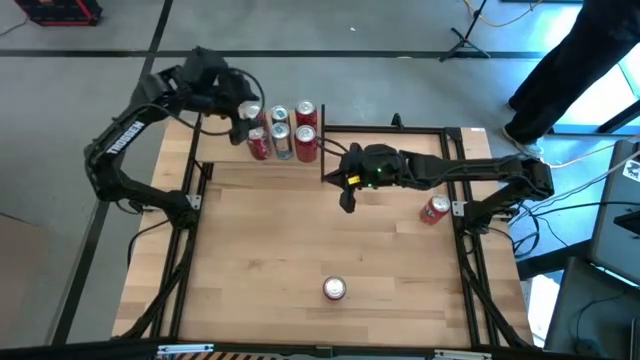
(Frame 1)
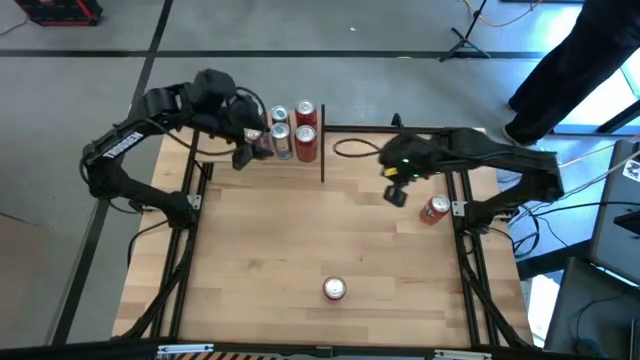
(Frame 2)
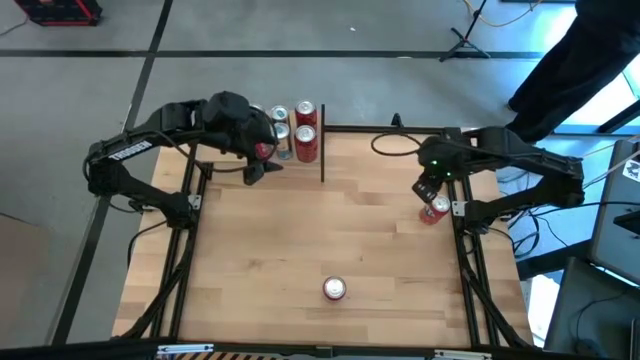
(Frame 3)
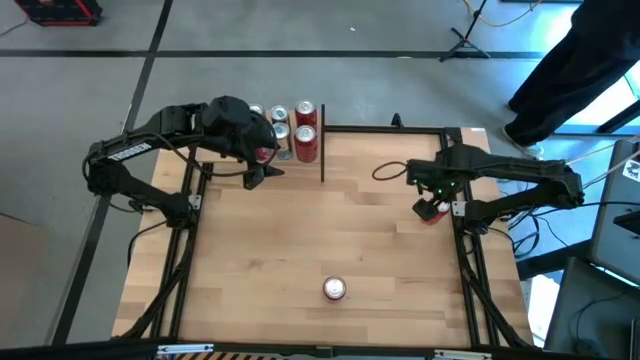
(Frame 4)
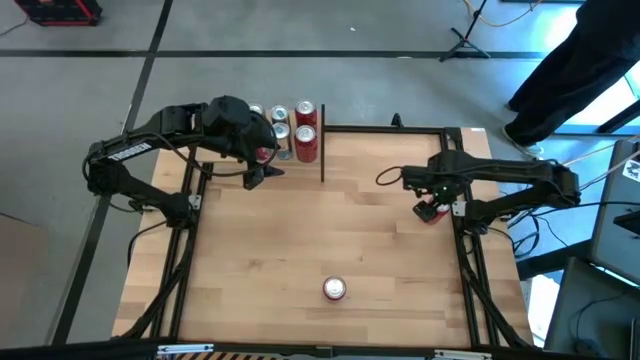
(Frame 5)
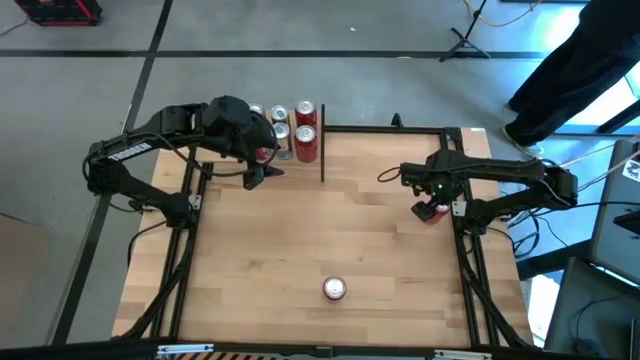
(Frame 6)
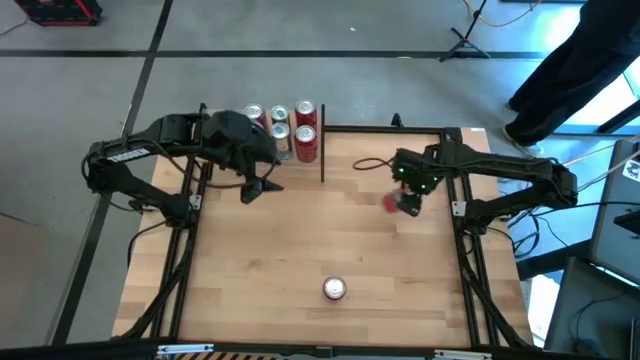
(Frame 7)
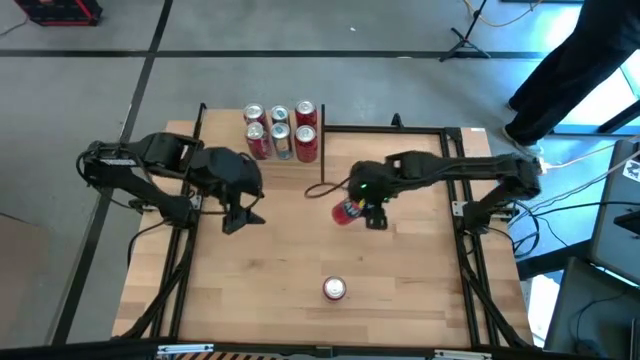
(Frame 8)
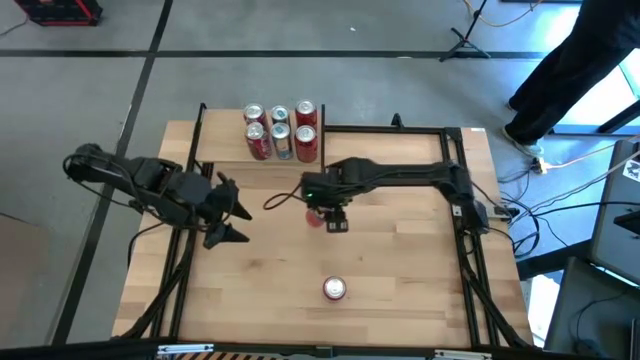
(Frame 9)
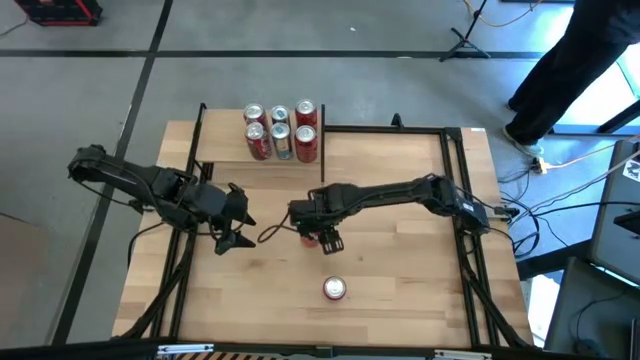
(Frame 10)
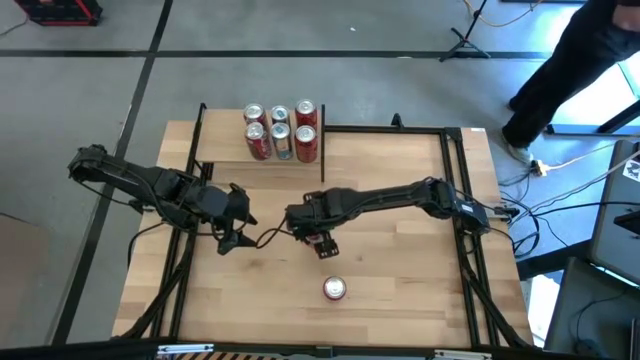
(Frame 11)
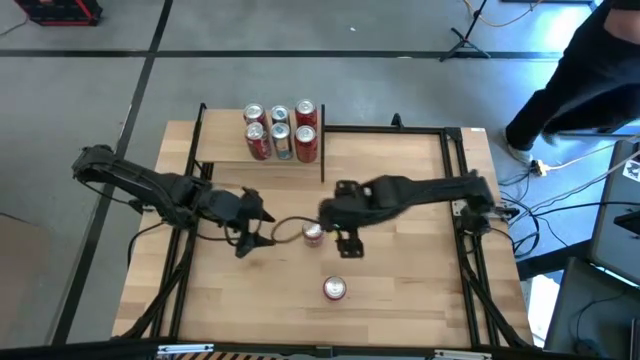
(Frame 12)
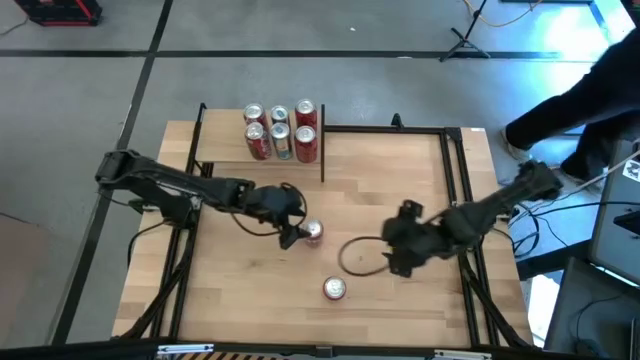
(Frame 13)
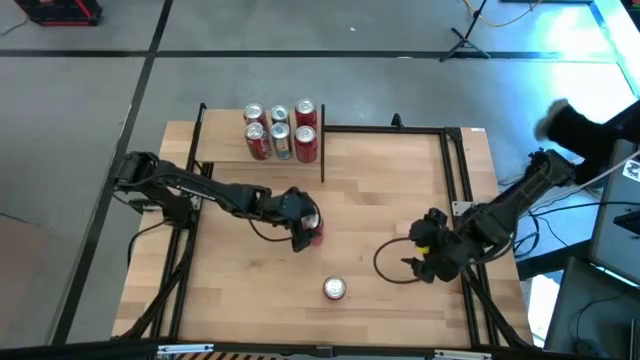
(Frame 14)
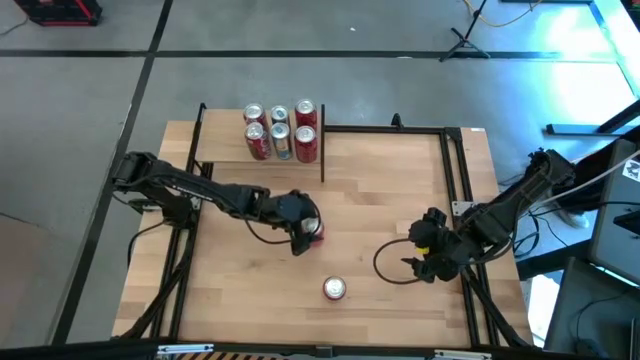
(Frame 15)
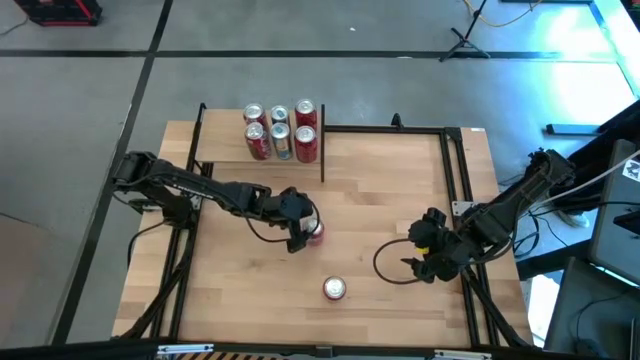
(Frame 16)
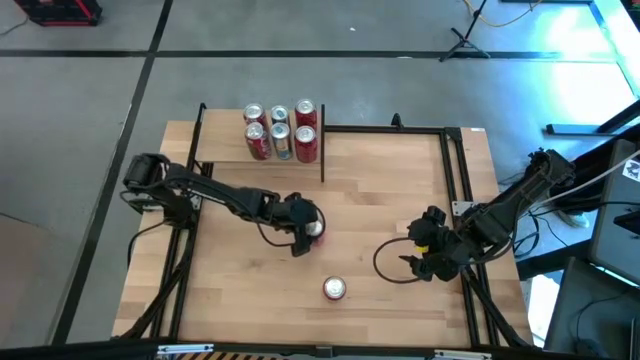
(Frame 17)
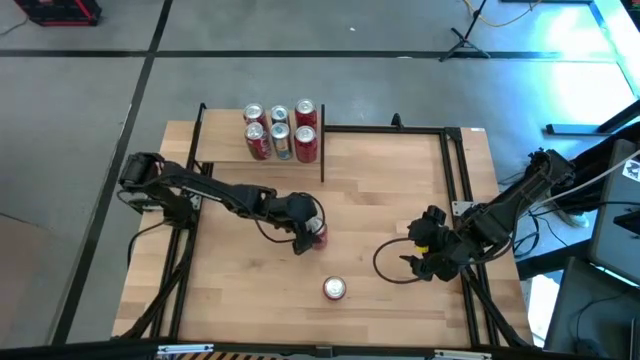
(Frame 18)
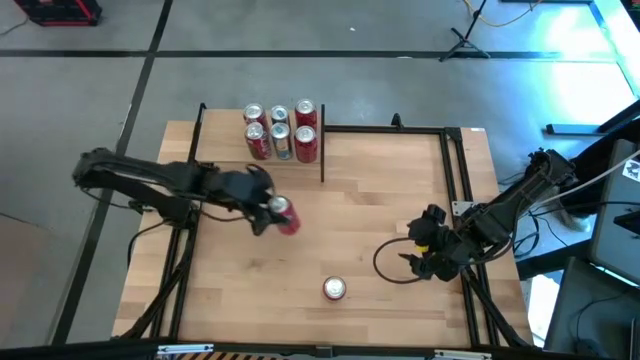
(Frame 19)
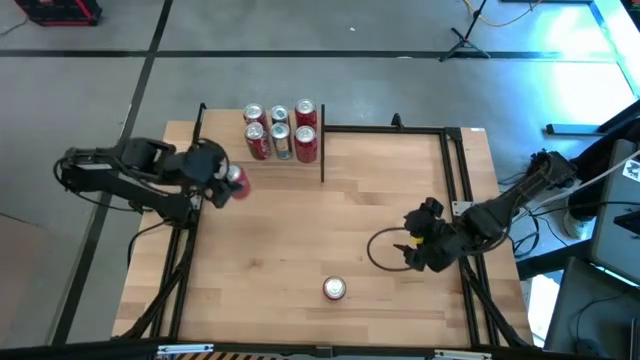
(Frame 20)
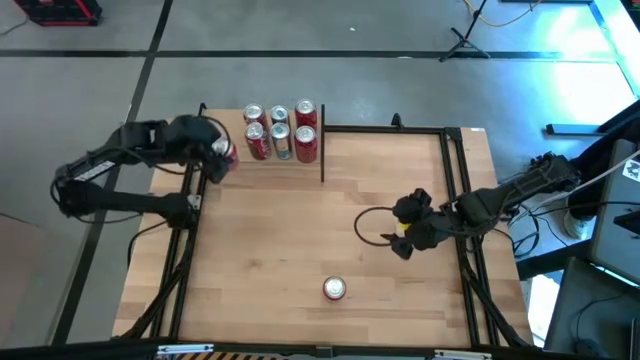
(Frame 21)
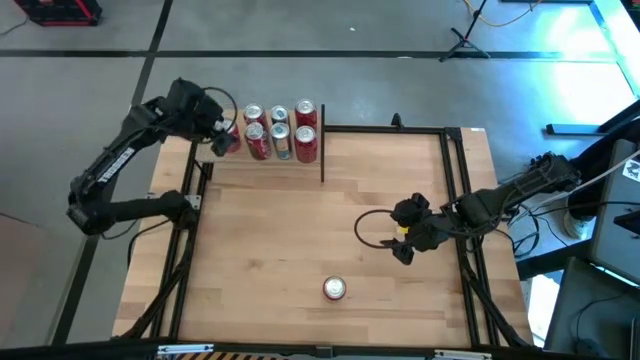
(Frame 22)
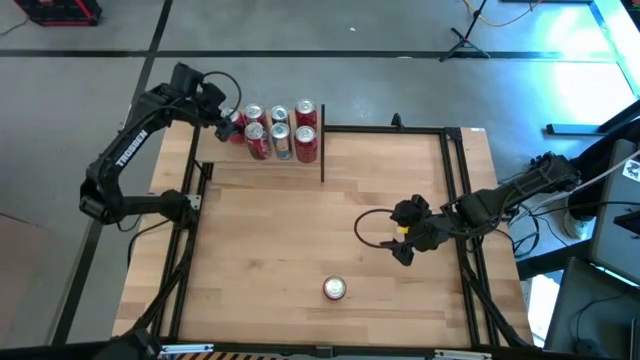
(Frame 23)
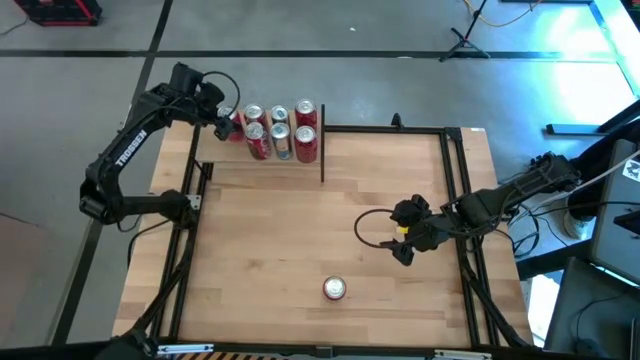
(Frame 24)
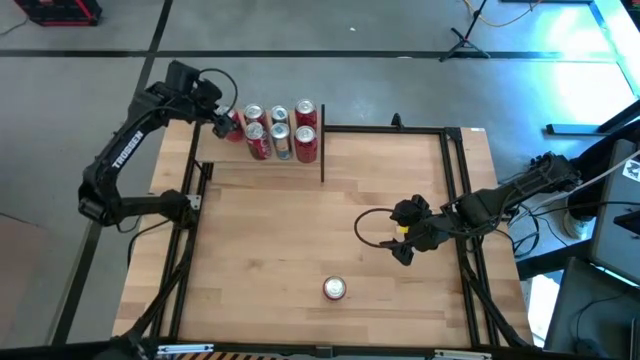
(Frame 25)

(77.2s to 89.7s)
Task: Place canned beverage on shelf
Put the top orange soda can on the shelf

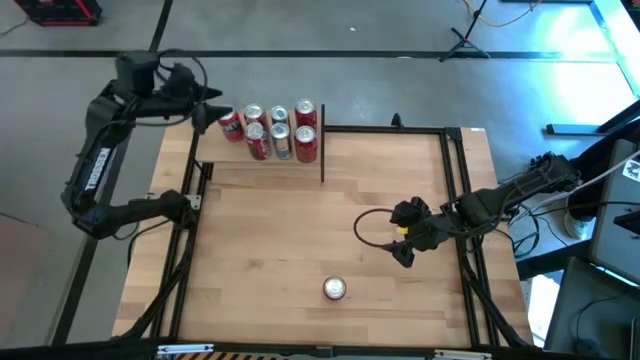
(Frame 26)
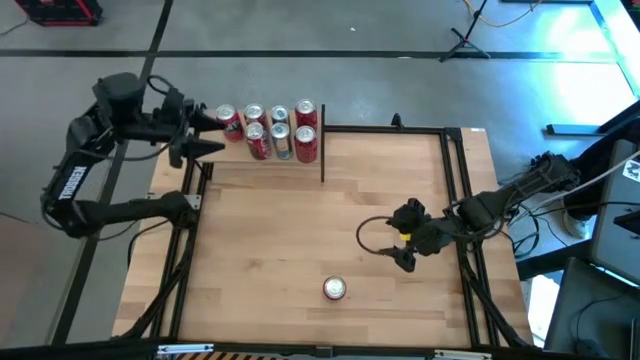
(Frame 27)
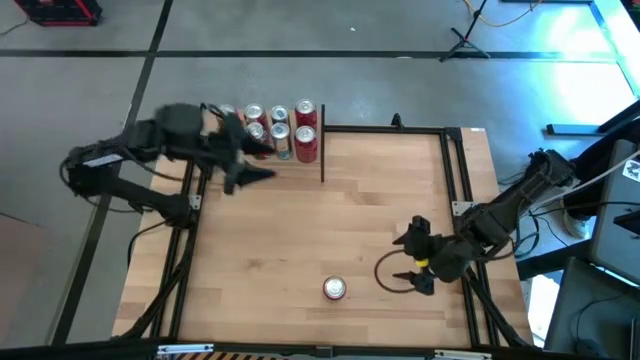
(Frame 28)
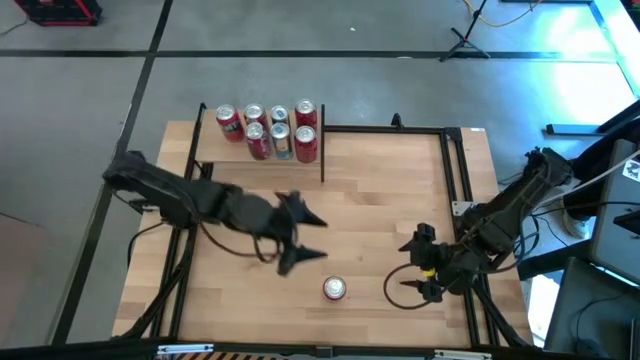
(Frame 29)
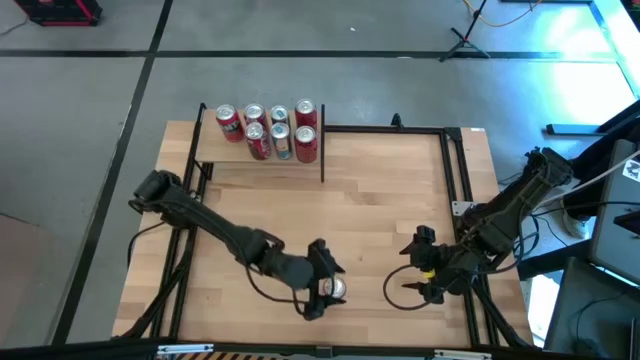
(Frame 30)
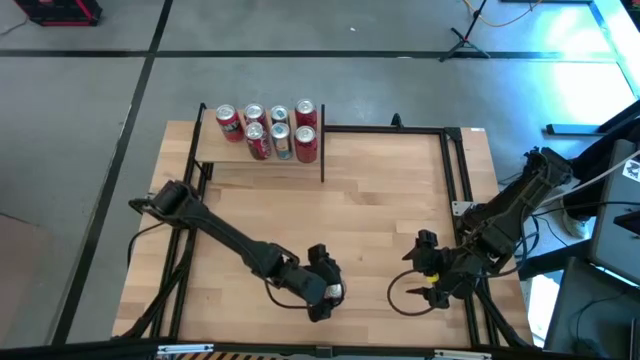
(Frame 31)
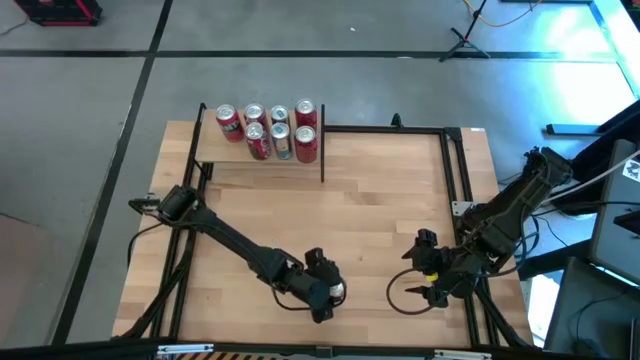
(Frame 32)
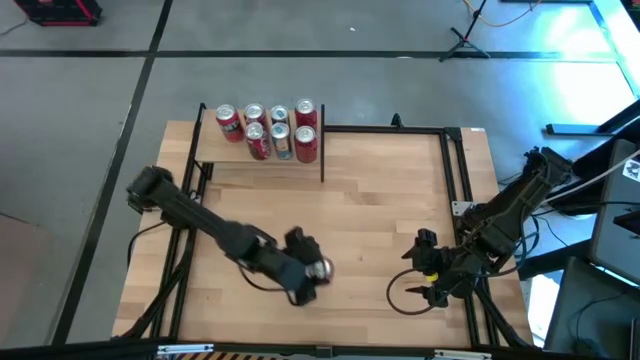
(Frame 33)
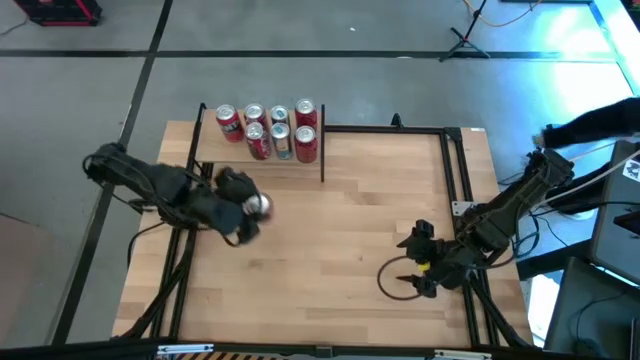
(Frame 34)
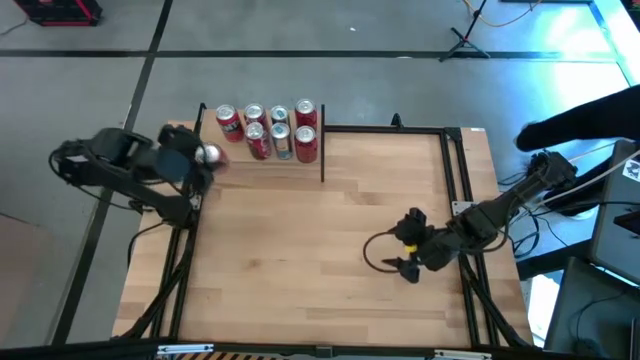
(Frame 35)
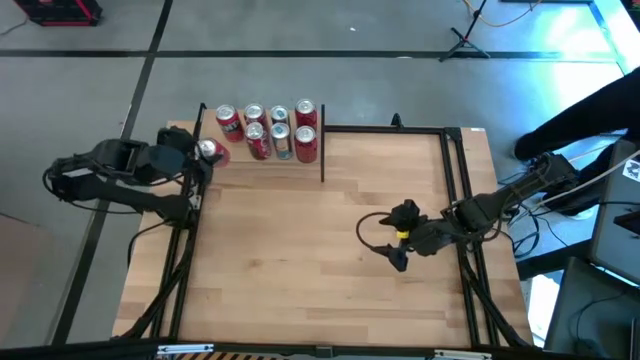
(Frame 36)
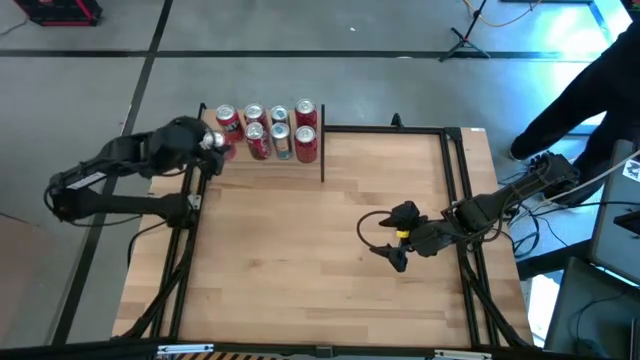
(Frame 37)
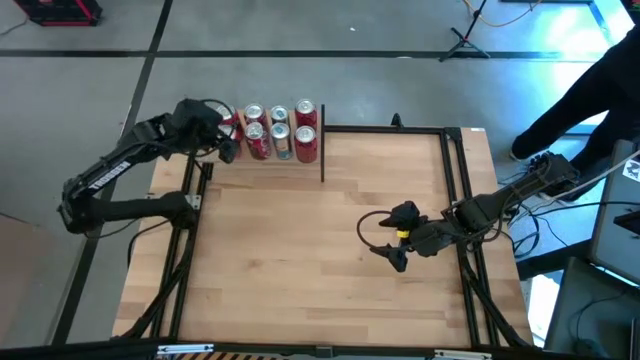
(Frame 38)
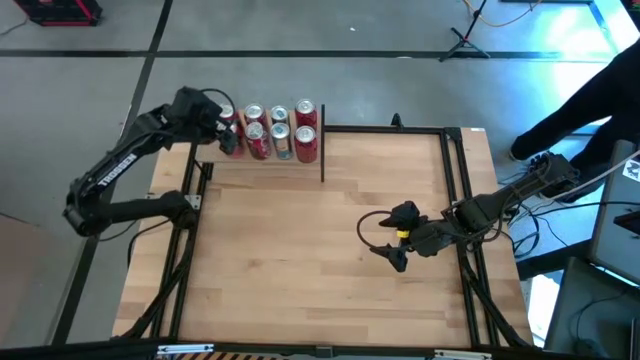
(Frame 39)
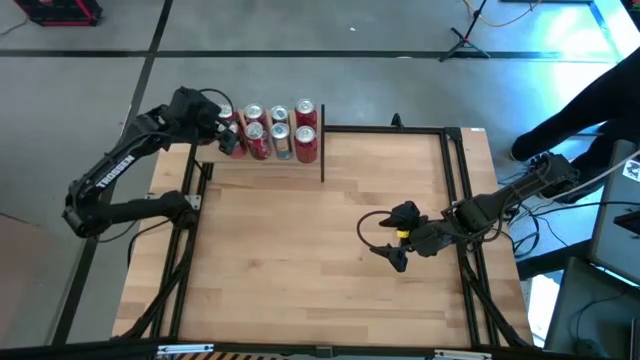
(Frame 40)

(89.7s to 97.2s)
Put the orange soda can on the shelf and aligned with the other orange soda can

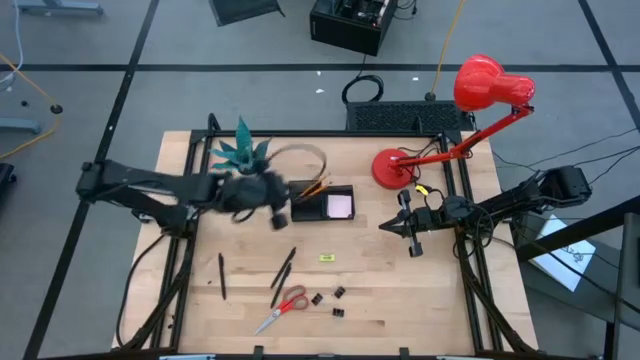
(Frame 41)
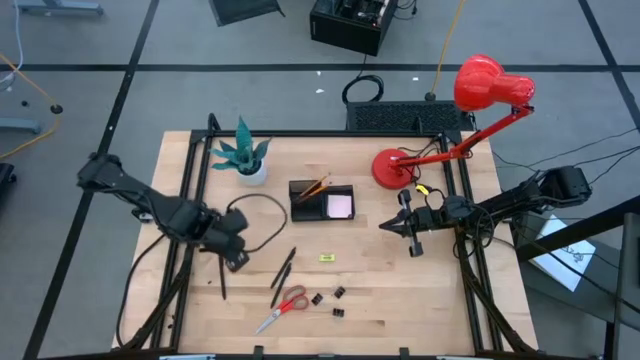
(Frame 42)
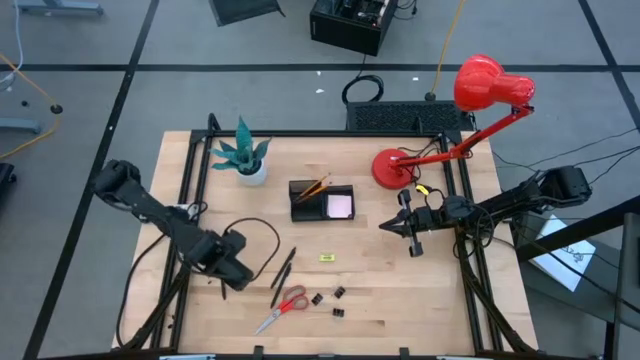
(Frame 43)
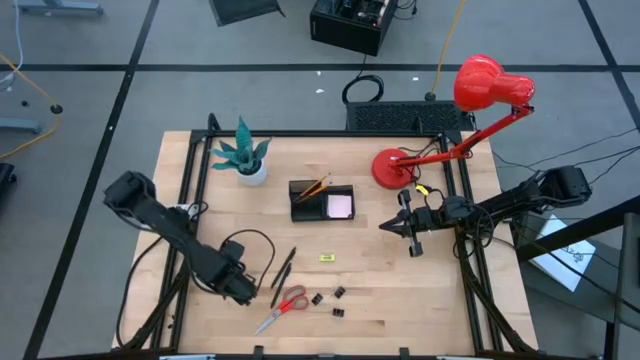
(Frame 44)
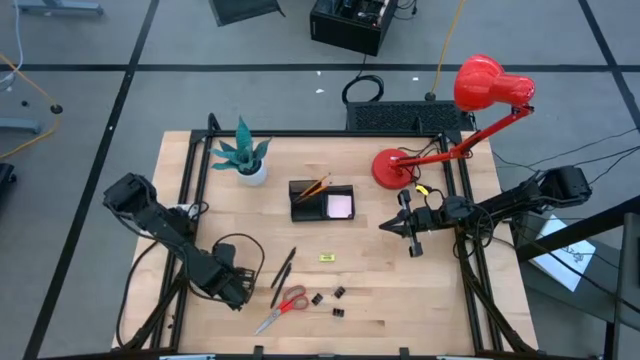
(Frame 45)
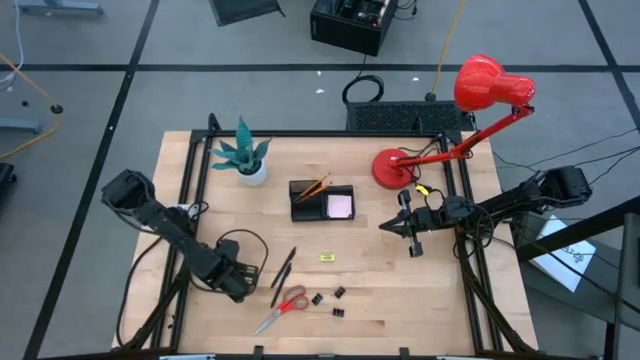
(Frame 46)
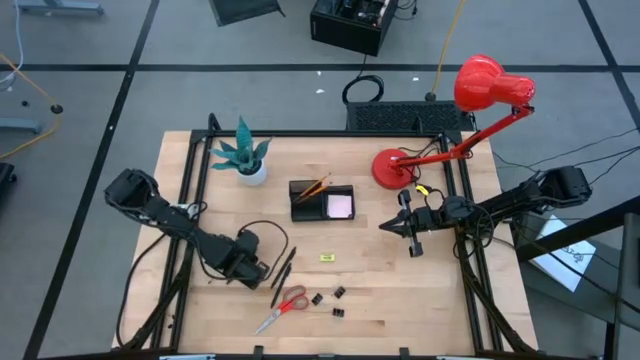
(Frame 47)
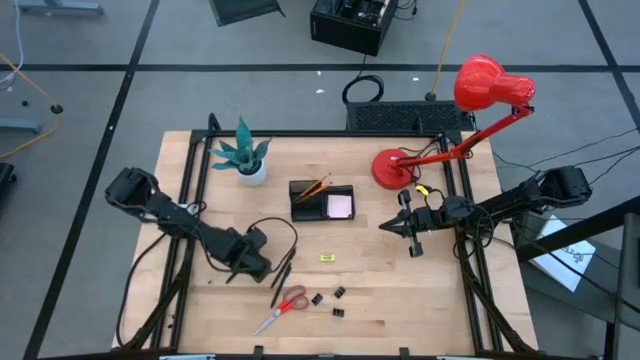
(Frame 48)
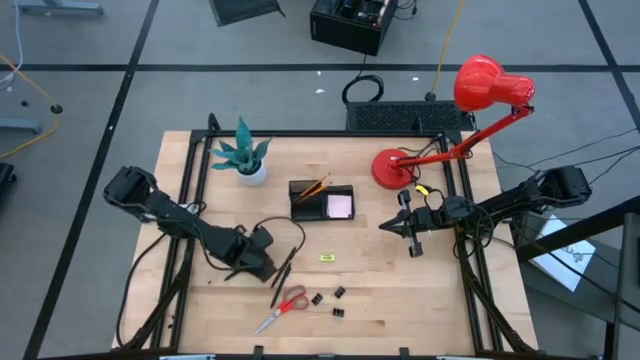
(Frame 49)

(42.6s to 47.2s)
Task: Pick and place office supplies into organizer
Put the black pen into the black desk organizer
